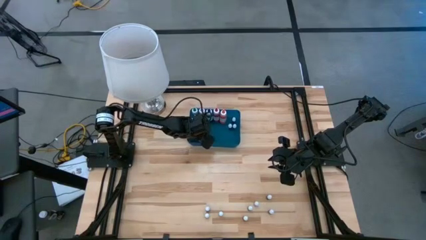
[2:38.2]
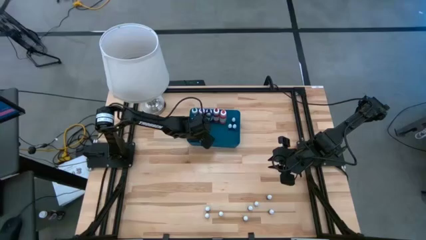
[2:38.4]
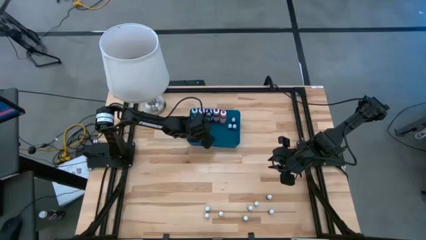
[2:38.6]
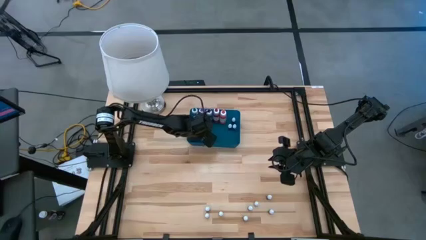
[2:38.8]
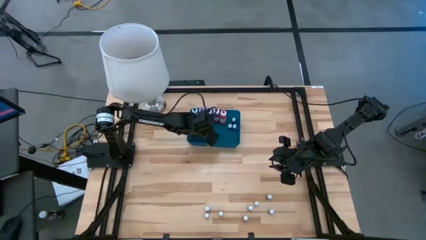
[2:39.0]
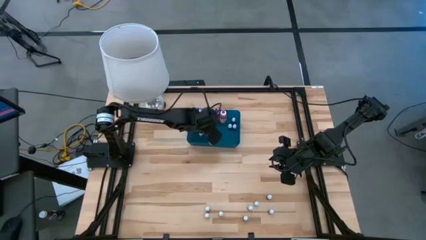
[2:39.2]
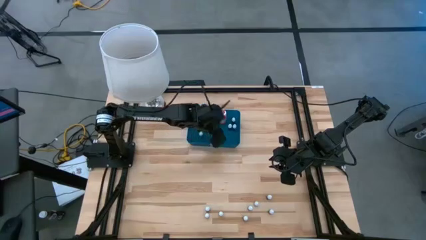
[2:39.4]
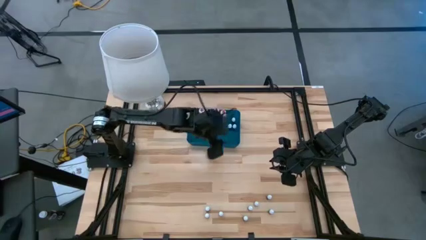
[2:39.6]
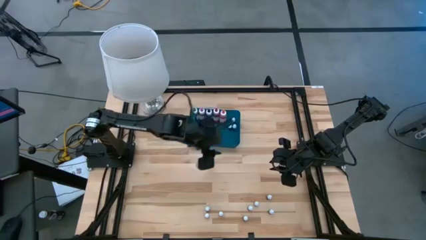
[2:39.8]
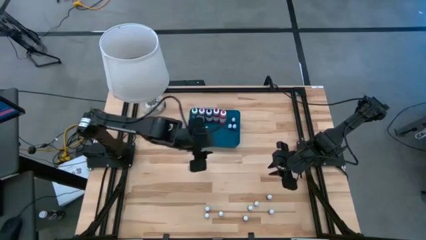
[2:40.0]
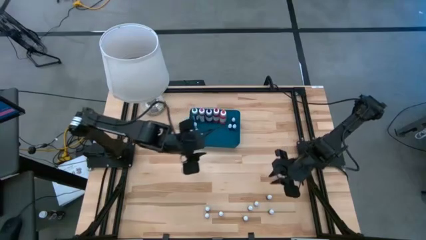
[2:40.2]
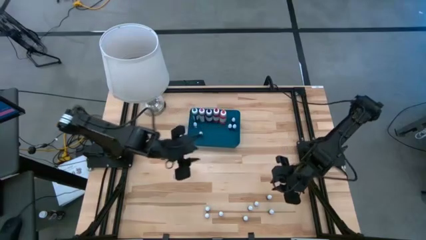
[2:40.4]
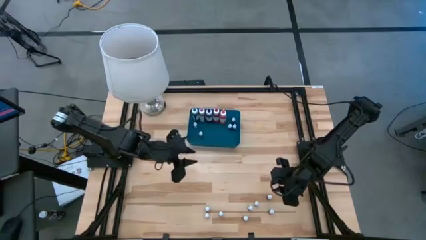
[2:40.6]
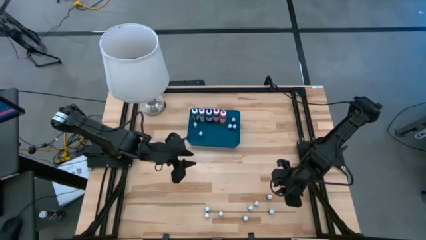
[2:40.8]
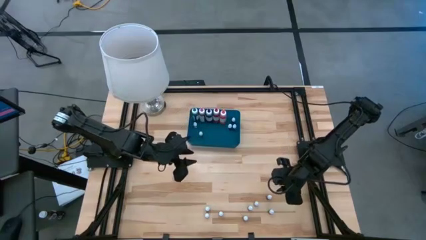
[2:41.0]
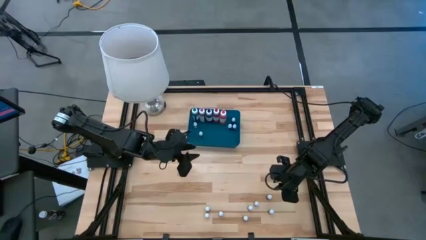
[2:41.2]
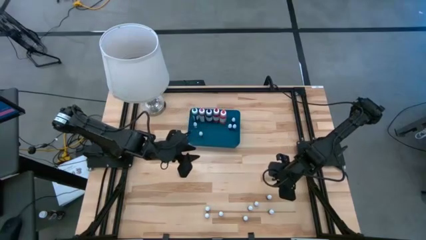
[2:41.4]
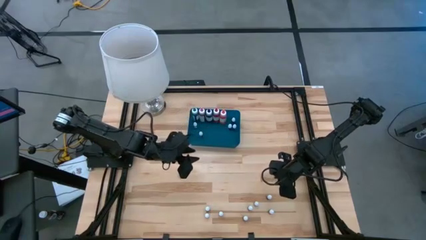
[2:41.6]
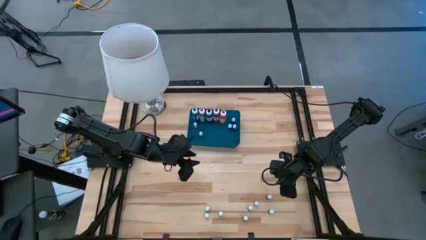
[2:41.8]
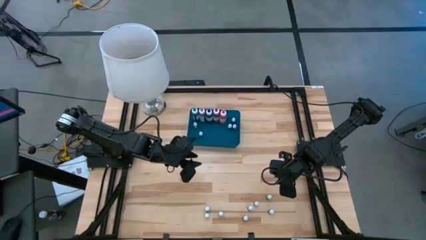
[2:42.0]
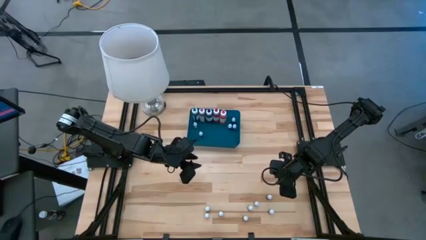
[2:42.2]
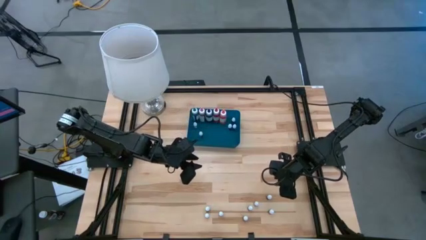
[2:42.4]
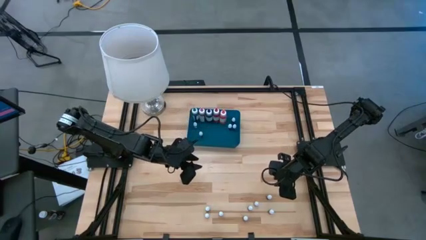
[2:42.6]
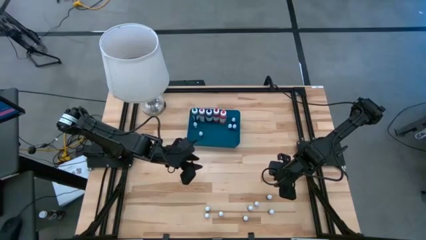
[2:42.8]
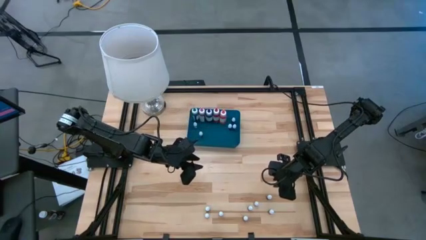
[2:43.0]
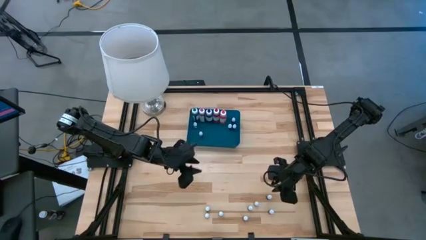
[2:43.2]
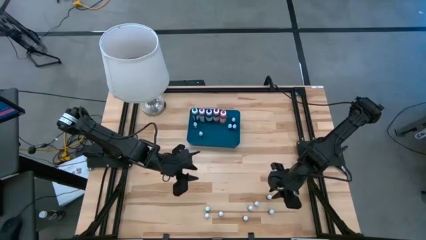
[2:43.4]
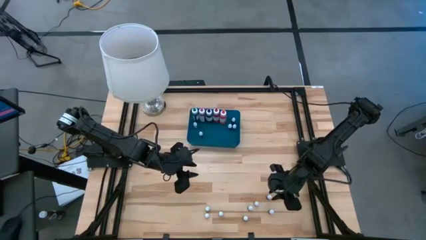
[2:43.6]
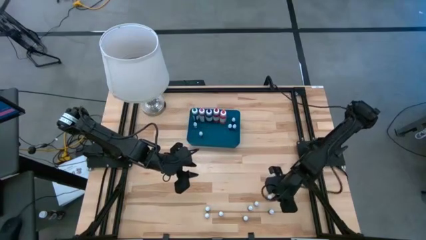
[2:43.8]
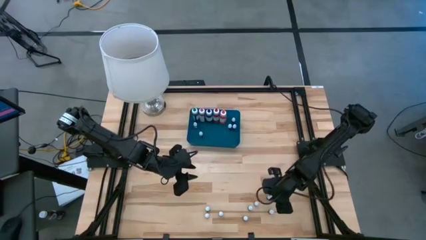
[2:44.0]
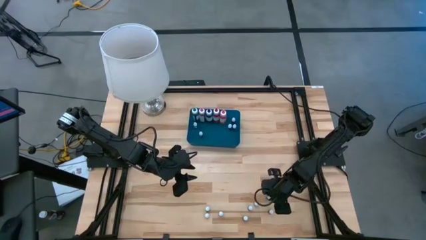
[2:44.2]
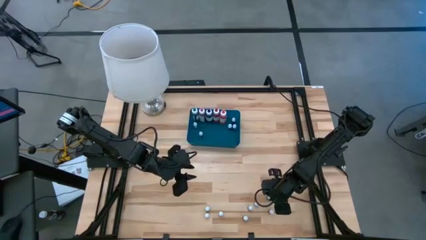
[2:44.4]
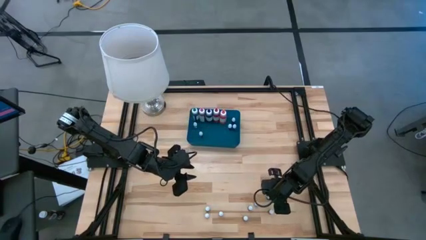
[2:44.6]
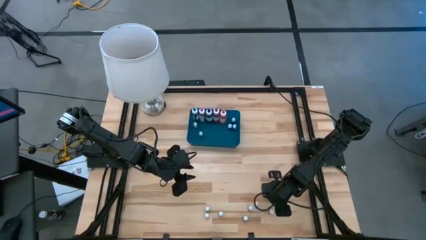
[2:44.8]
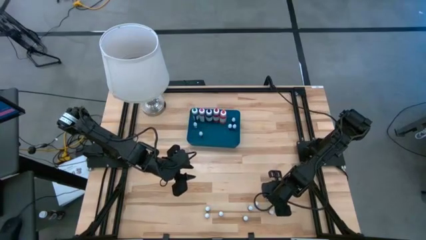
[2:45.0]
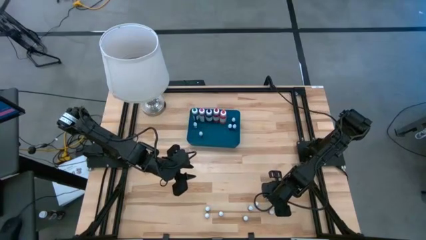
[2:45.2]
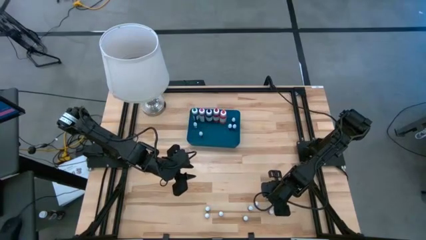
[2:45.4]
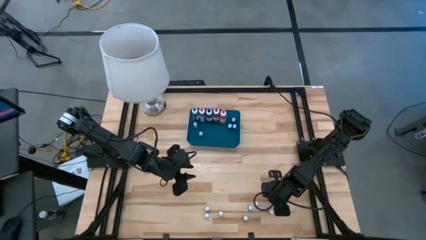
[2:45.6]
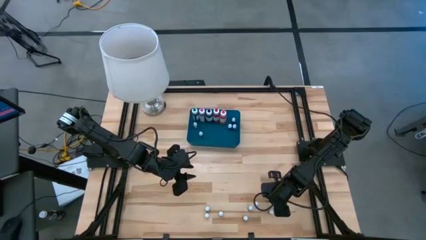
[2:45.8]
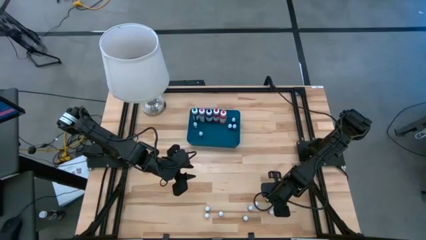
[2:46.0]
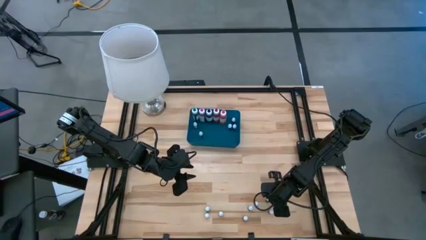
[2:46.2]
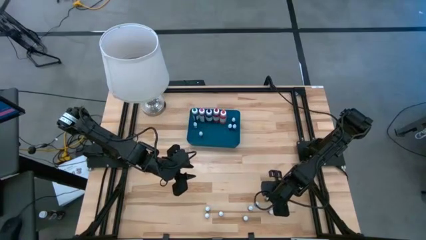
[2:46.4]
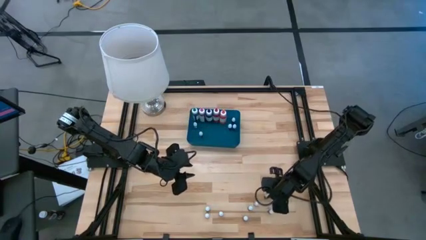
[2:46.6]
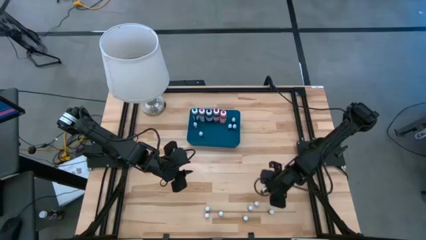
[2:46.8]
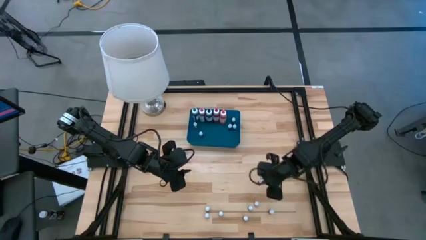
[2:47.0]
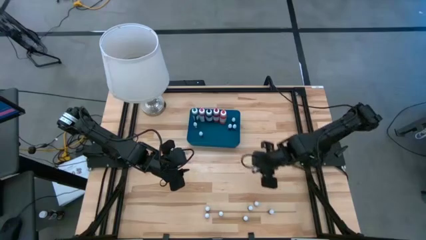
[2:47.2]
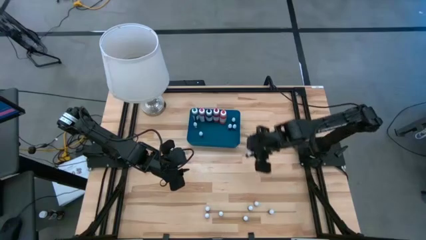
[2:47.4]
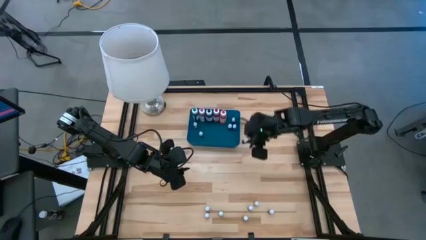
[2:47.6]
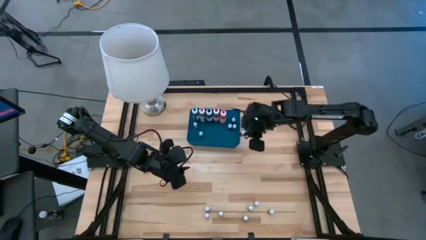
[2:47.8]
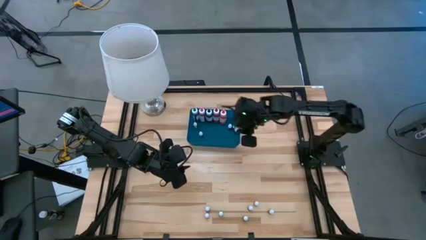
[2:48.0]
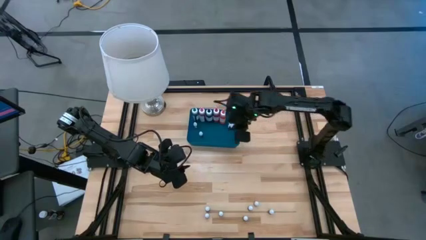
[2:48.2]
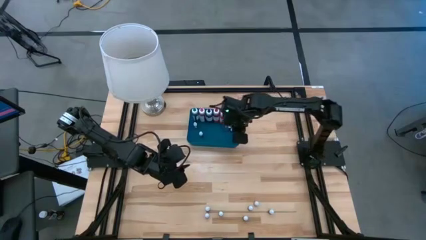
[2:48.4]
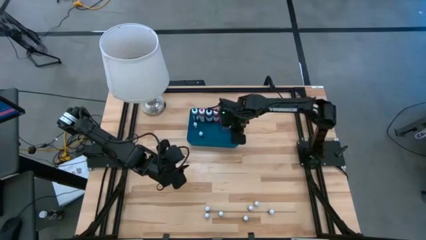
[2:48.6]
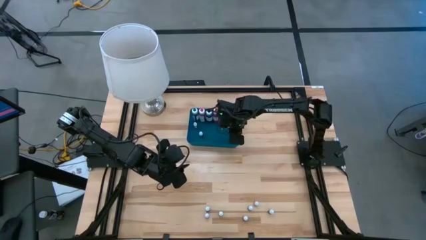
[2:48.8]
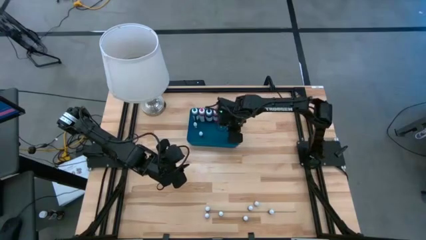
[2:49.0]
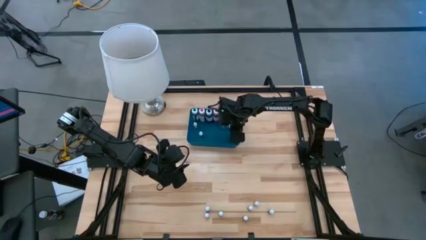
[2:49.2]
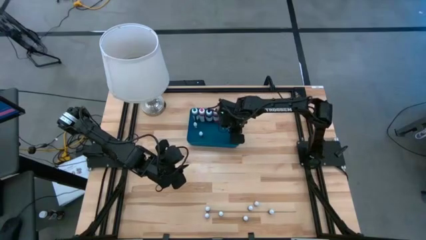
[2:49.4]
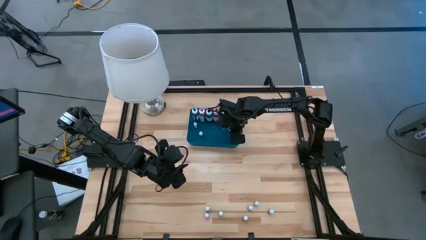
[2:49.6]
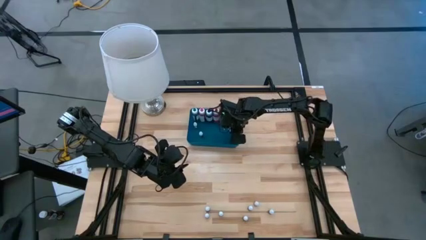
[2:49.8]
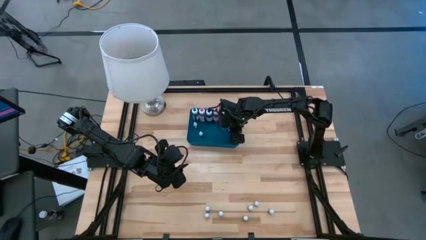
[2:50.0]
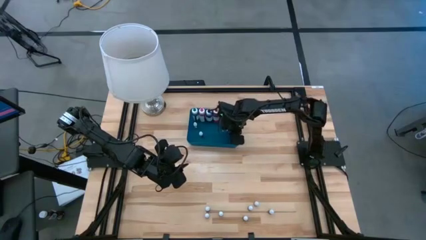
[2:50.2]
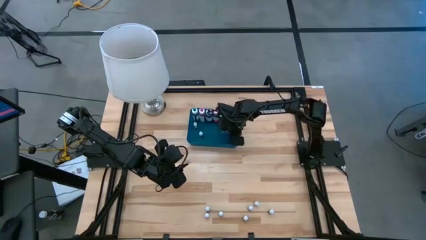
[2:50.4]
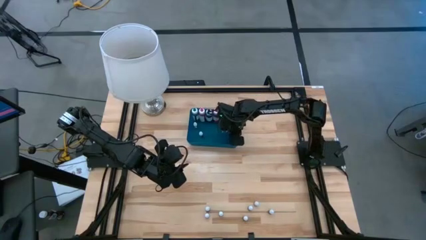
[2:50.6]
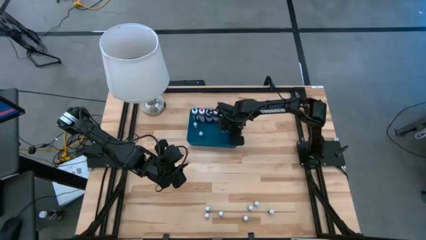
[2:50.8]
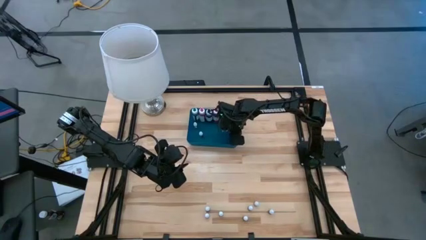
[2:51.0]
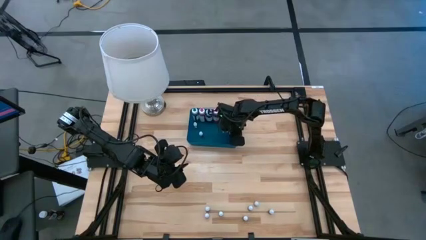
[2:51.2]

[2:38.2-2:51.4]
Task: Pick & Place food coloring
Put the small black food coloring bottle into the bin
